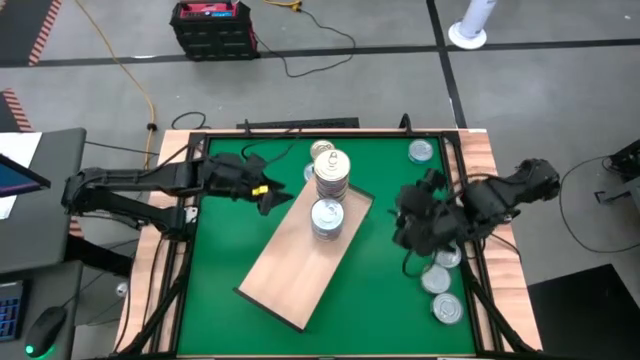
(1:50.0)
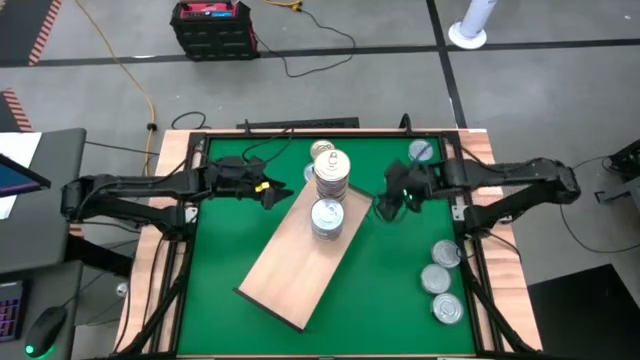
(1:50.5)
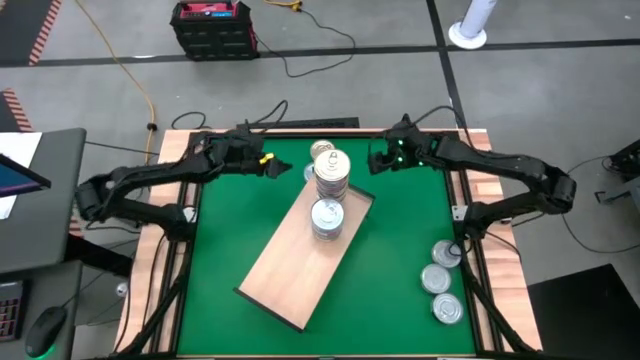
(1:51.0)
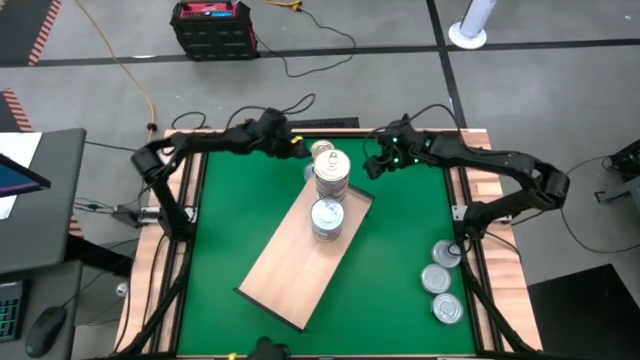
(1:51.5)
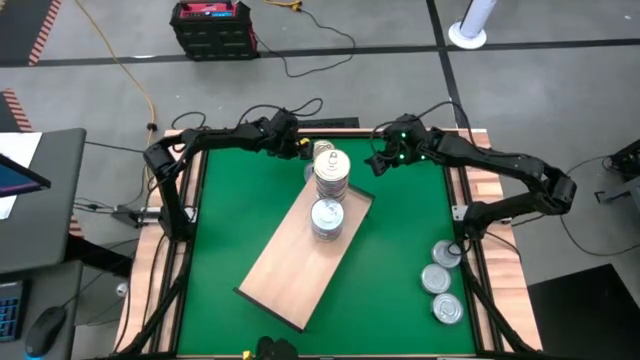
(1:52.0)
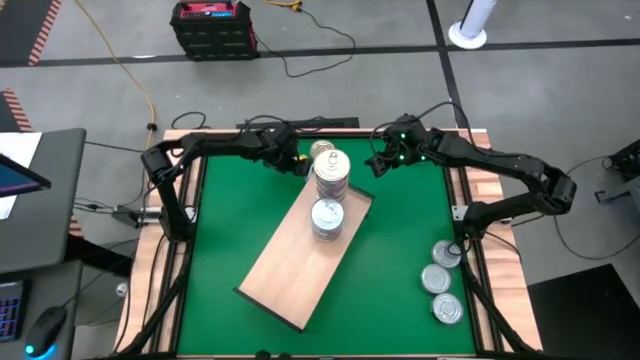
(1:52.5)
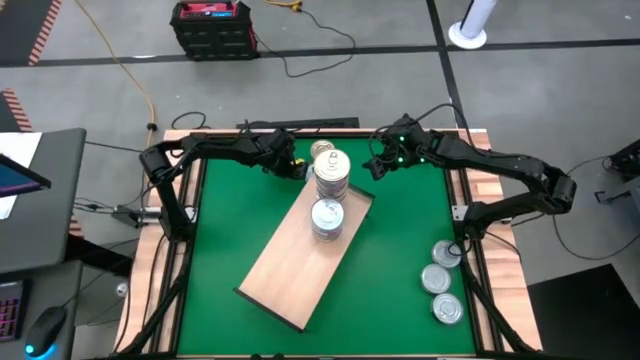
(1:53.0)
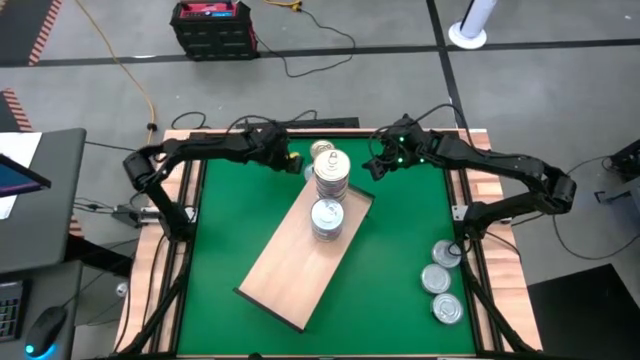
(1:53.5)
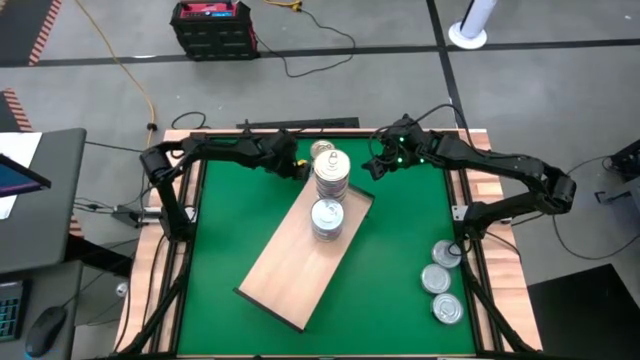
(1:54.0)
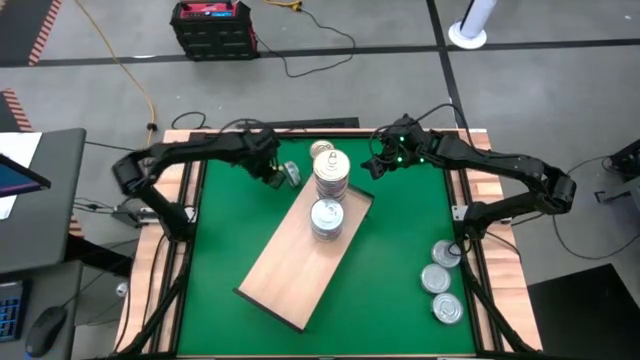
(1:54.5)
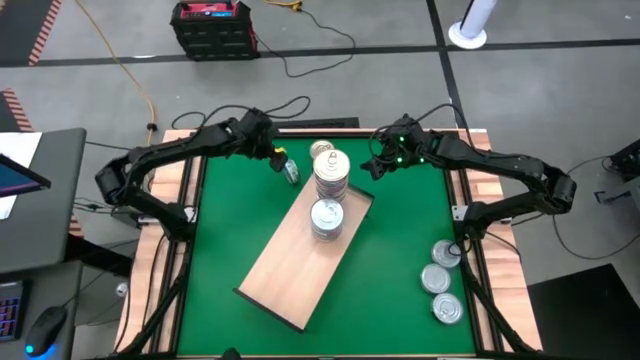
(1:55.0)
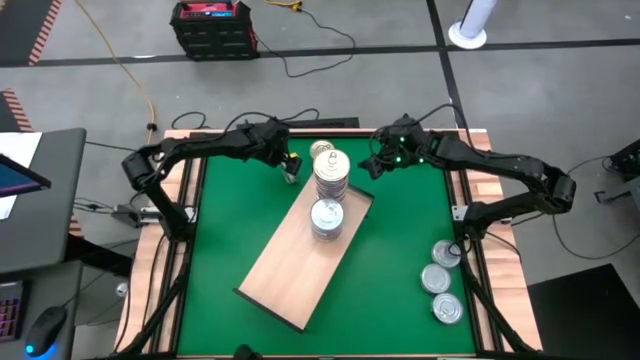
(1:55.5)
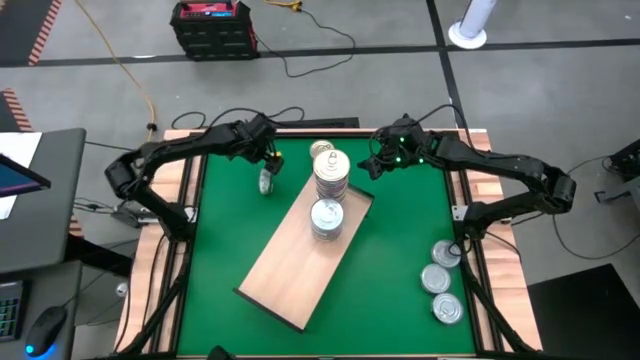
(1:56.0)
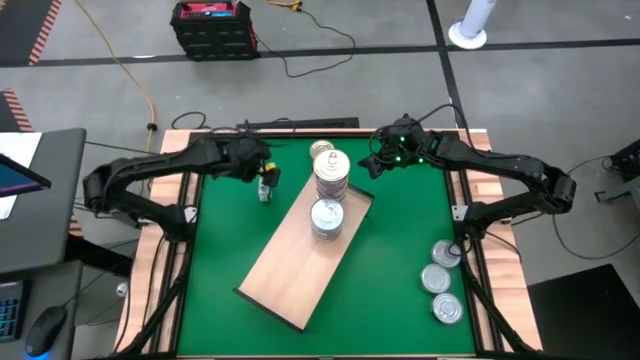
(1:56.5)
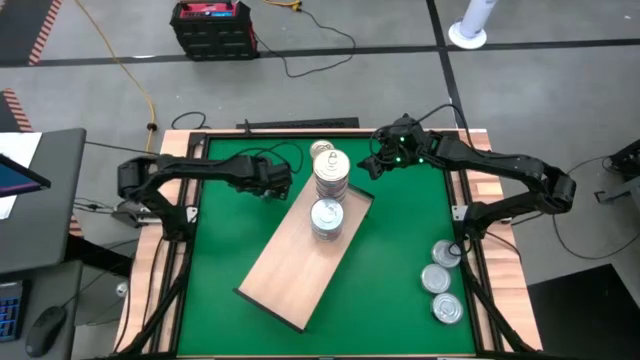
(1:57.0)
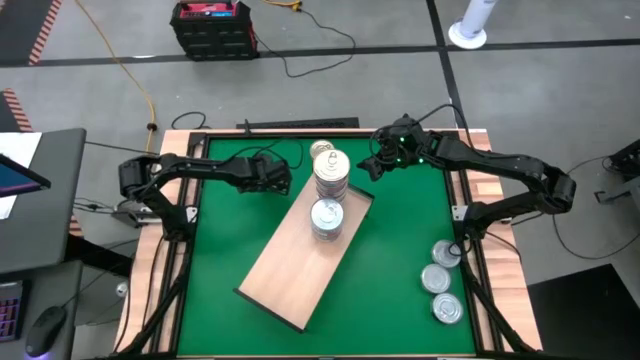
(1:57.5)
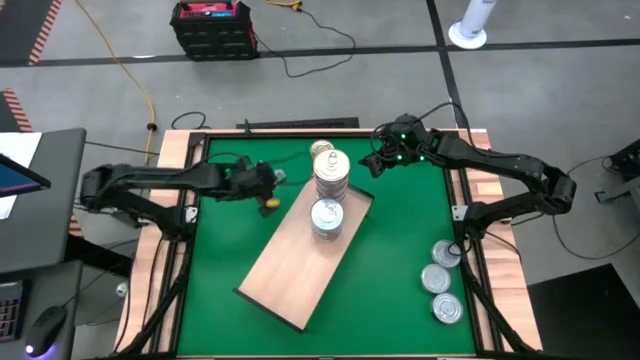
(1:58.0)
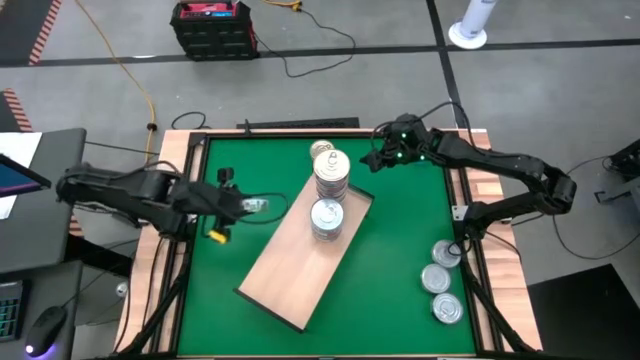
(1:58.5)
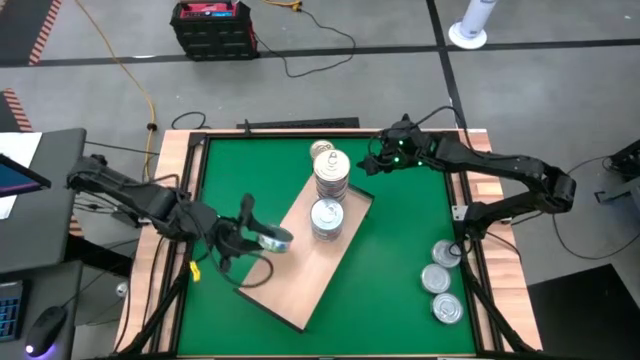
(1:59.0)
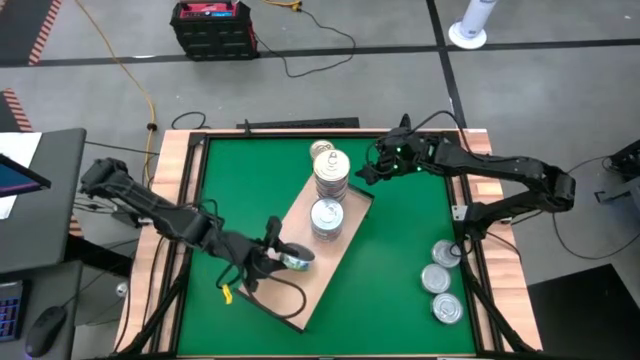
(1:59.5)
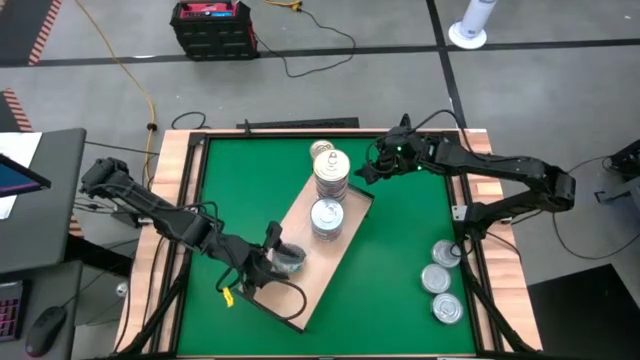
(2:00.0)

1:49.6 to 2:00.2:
Task: Stack canned seafood by type on shelf
Put the green white tuna can on the shelf

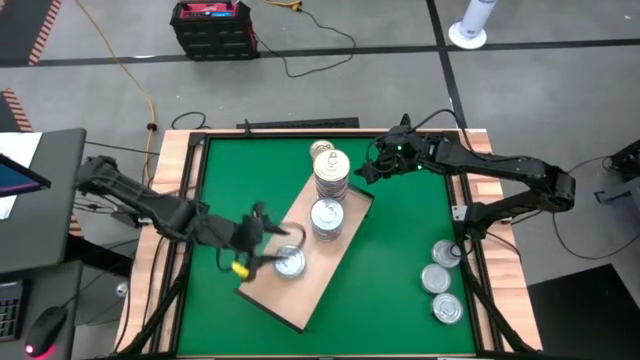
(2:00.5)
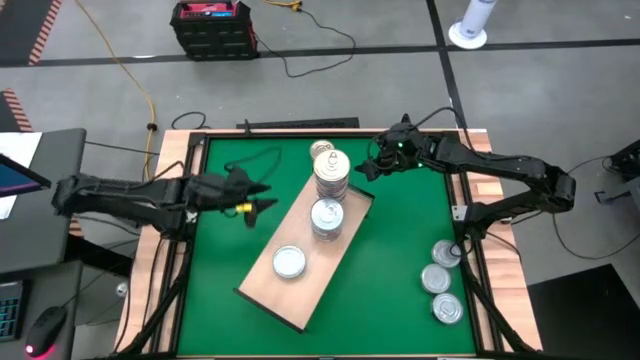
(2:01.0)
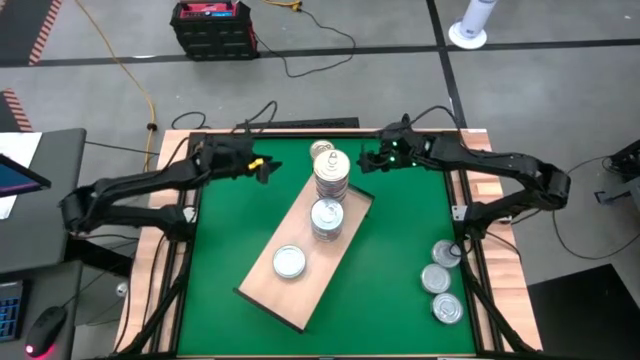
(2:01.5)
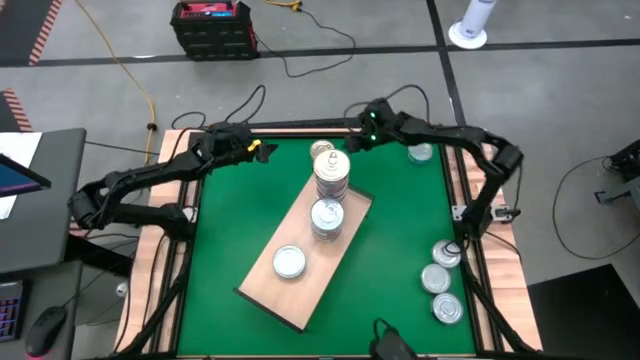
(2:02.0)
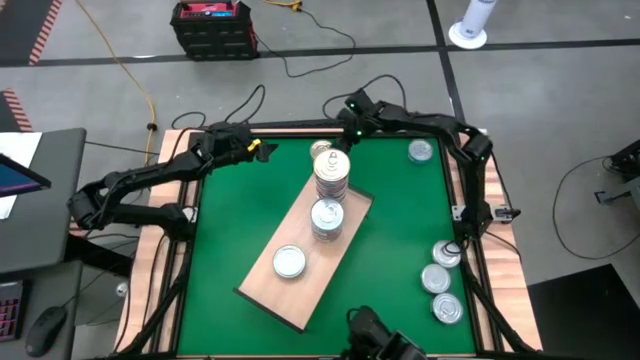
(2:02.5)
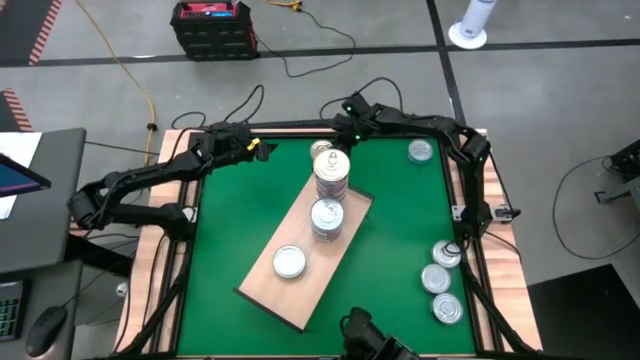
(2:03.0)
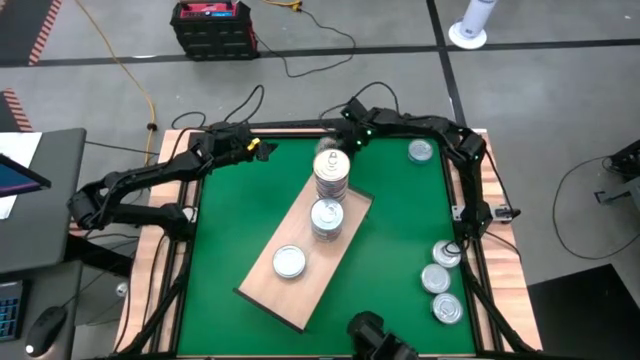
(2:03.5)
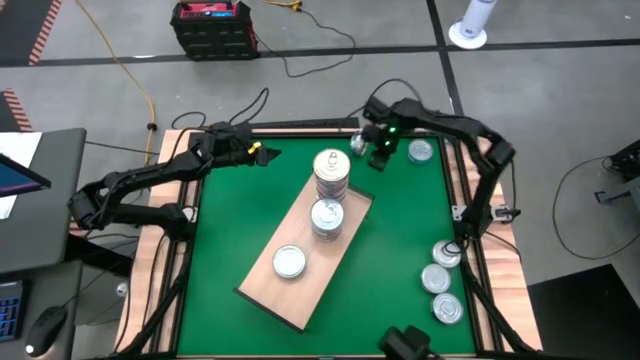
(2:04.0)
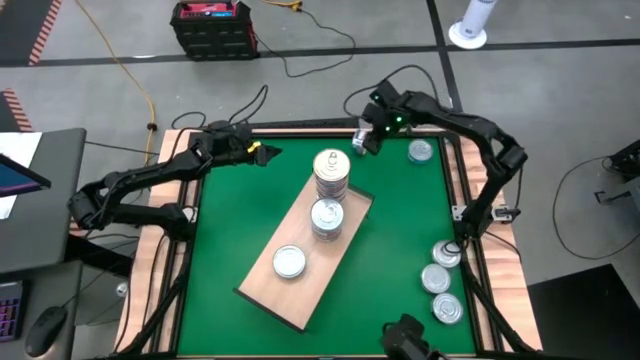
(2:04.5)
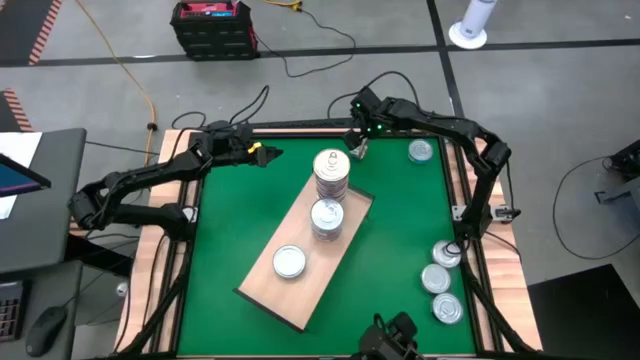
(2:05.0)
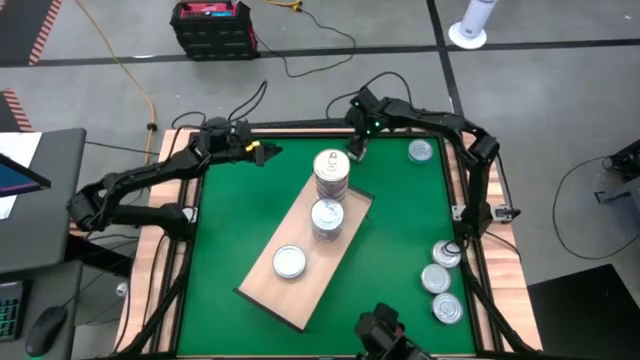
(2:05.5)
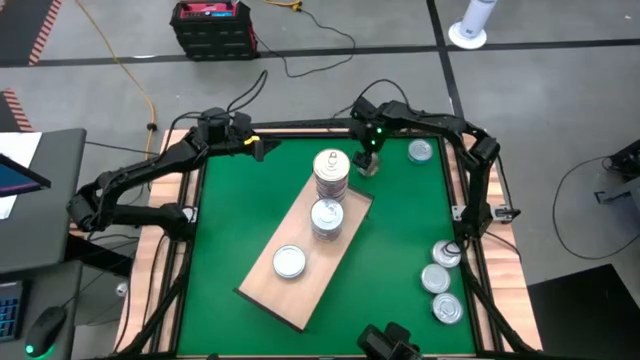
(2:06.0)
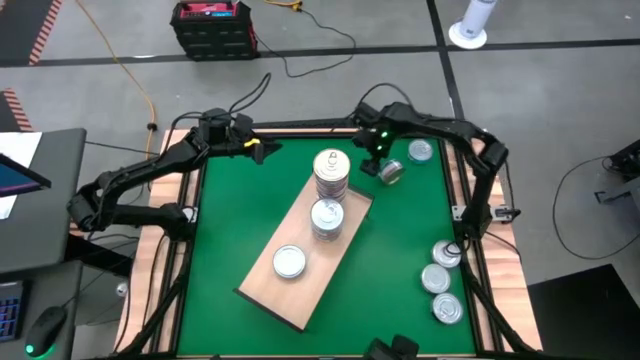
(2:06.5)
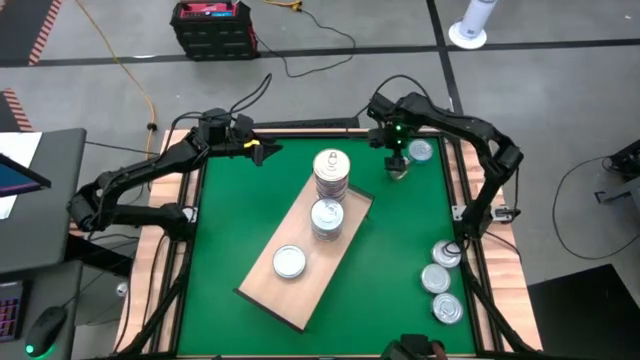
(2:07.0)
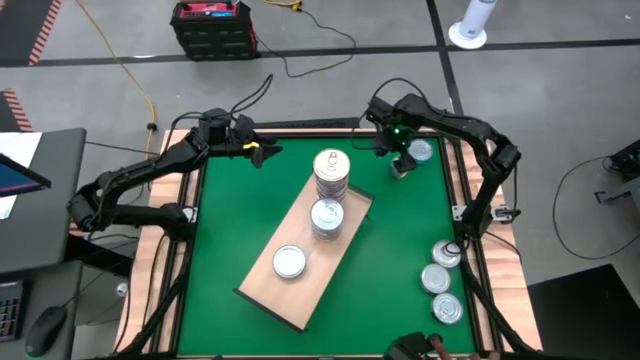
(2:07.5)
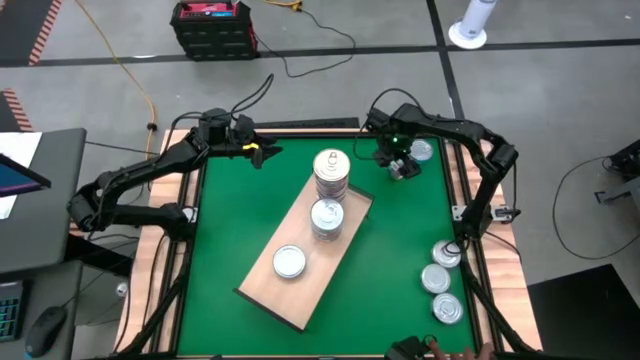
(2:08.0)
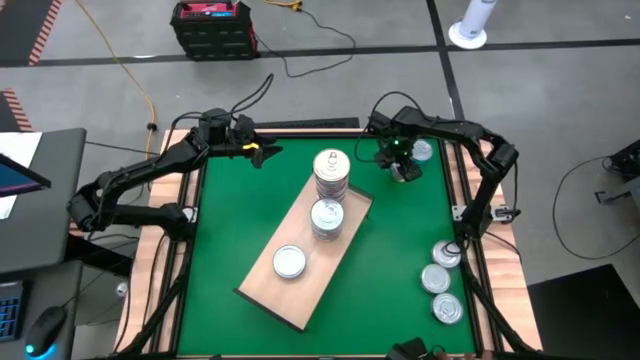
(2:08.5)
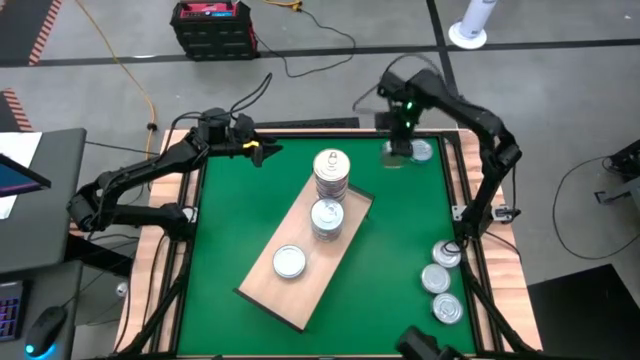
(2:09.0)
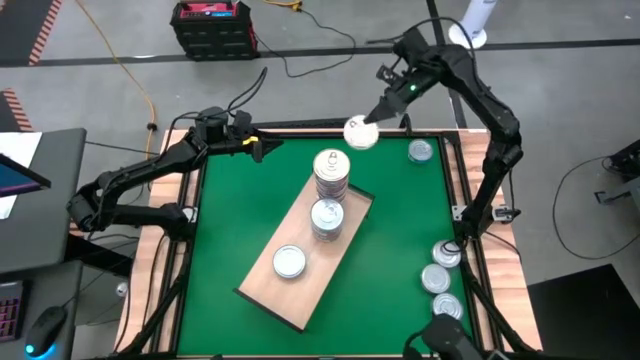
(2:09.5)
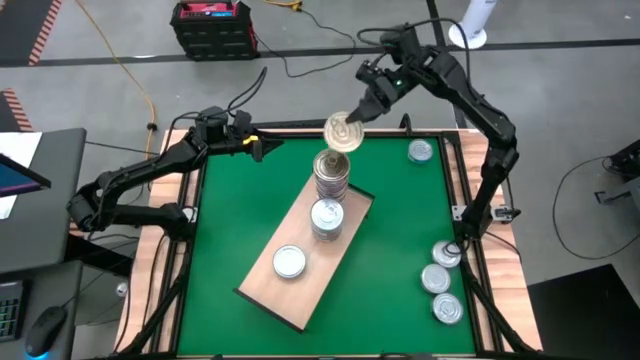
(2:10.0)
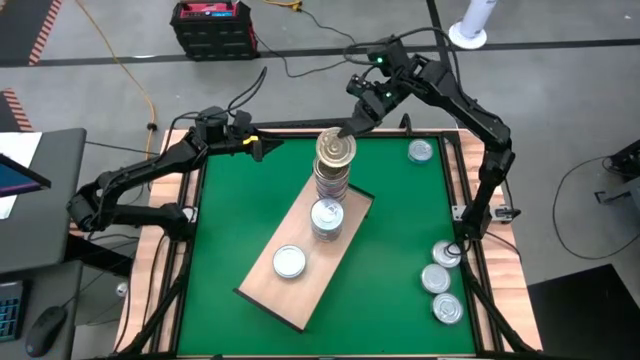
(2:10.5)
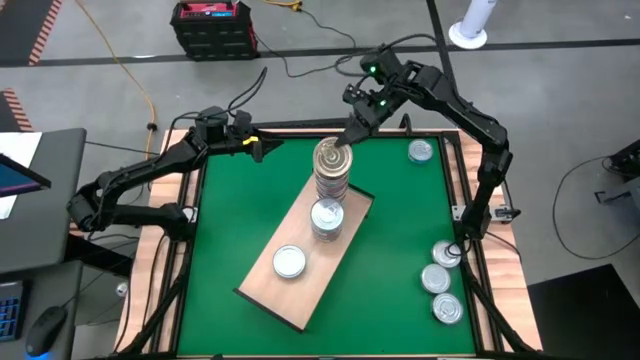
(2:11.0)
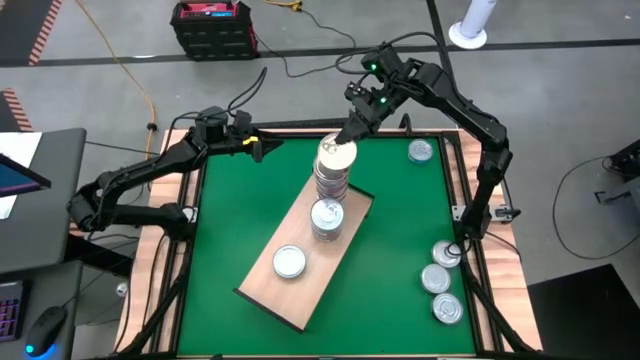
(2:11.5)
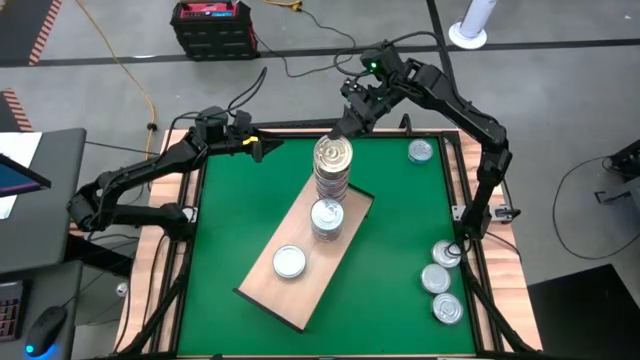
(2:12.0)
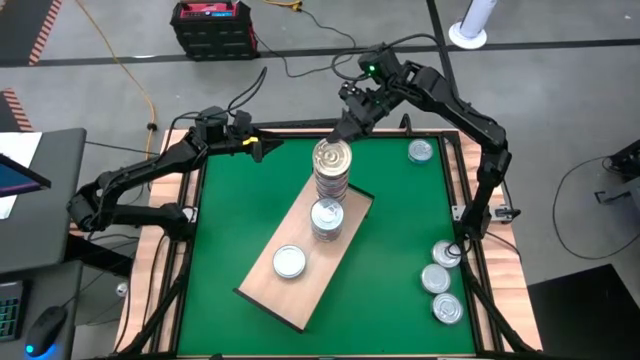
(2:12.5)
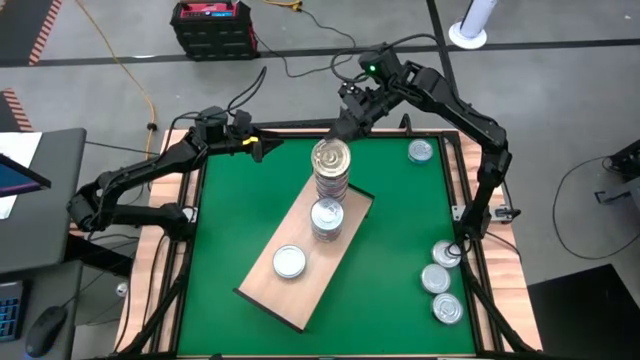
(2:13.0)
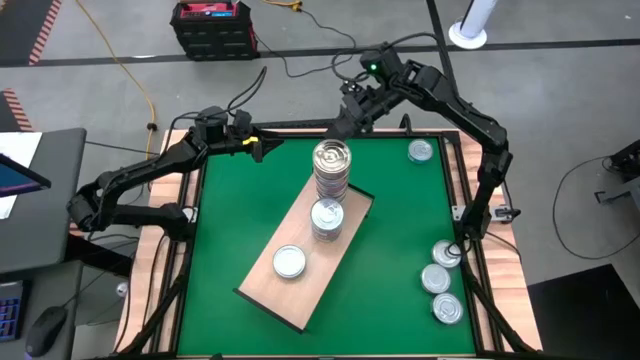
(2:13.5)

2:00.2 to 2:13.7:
Stack the blue pink tuna can on top of the other blue pink tuna cans on the shelf
